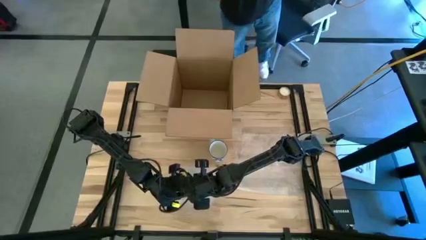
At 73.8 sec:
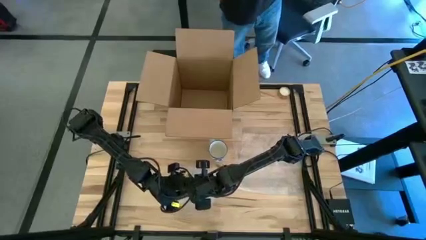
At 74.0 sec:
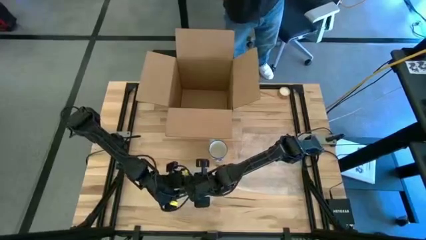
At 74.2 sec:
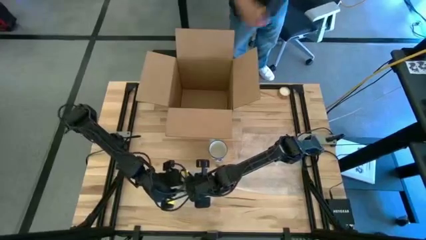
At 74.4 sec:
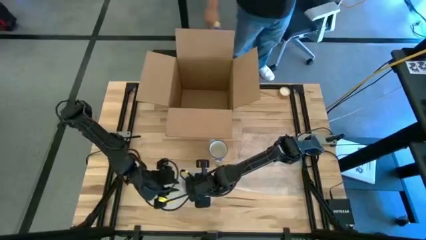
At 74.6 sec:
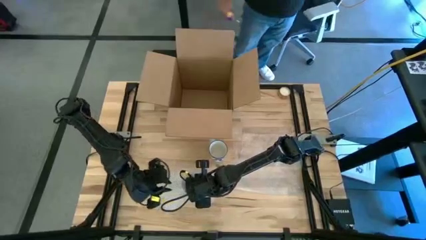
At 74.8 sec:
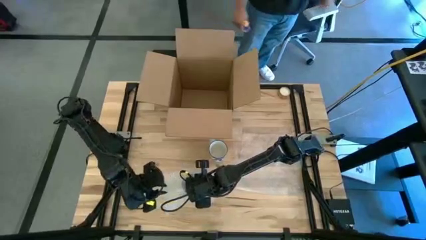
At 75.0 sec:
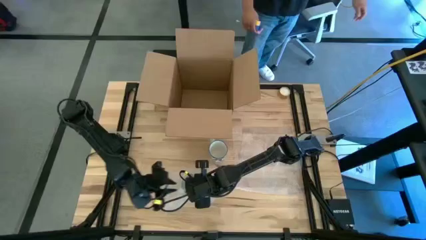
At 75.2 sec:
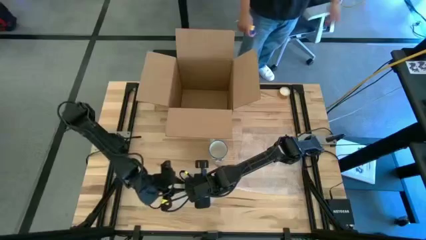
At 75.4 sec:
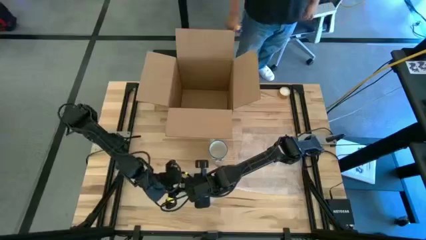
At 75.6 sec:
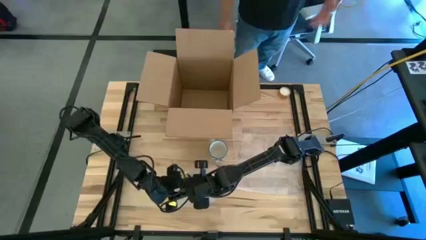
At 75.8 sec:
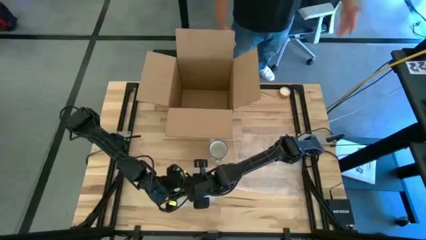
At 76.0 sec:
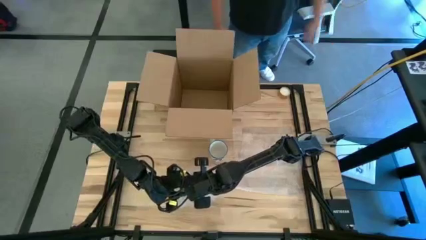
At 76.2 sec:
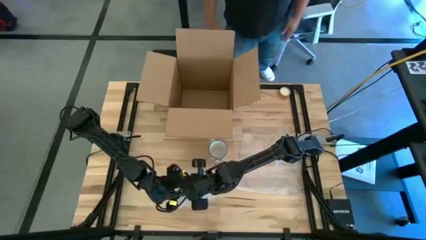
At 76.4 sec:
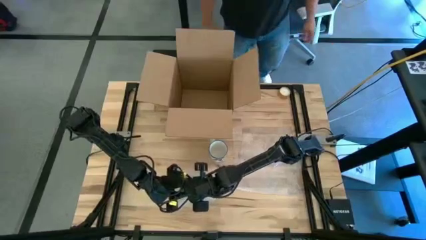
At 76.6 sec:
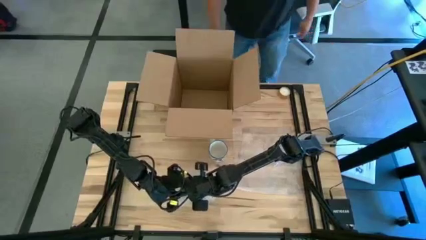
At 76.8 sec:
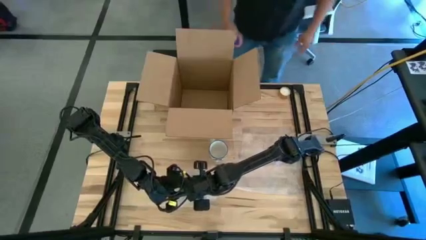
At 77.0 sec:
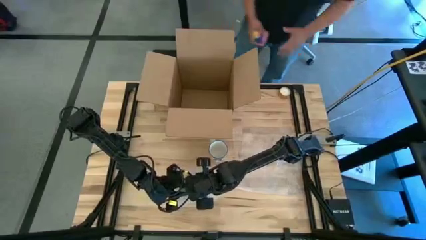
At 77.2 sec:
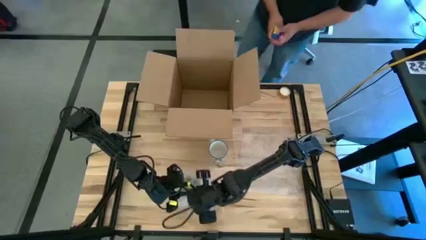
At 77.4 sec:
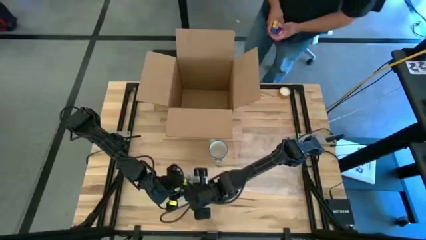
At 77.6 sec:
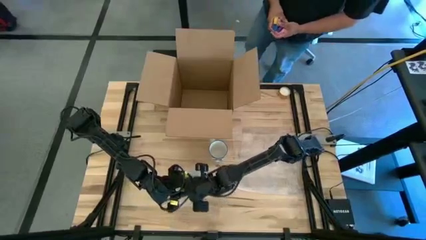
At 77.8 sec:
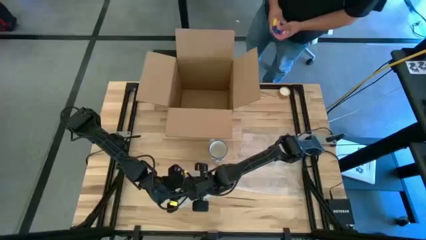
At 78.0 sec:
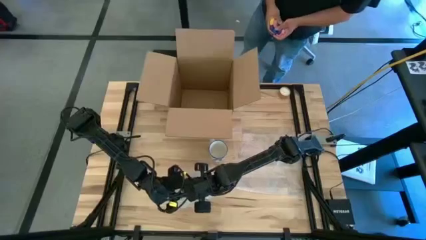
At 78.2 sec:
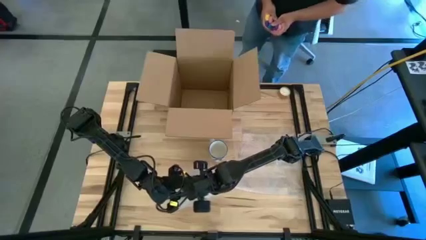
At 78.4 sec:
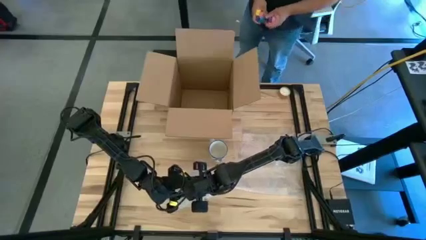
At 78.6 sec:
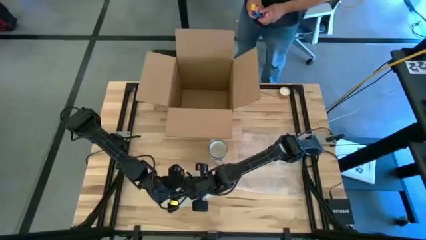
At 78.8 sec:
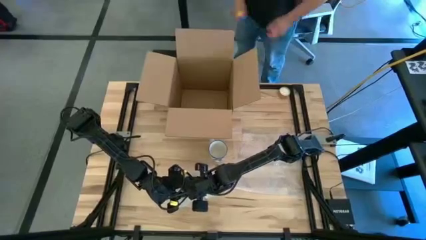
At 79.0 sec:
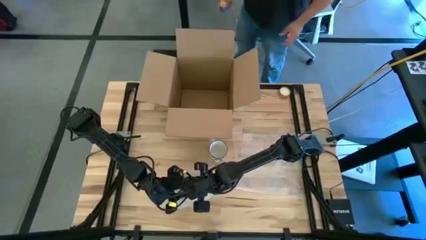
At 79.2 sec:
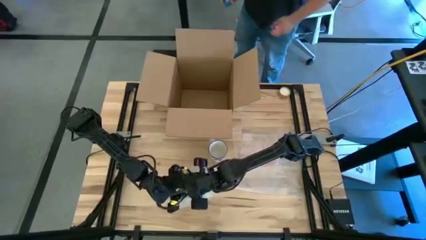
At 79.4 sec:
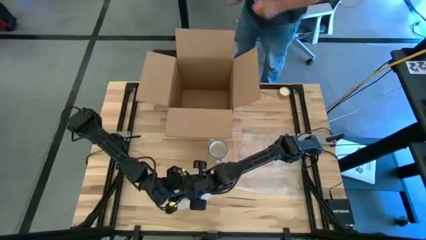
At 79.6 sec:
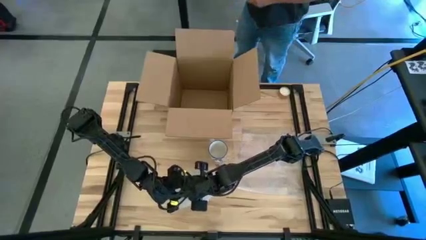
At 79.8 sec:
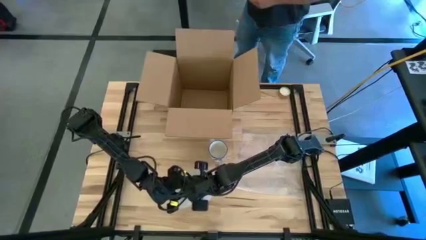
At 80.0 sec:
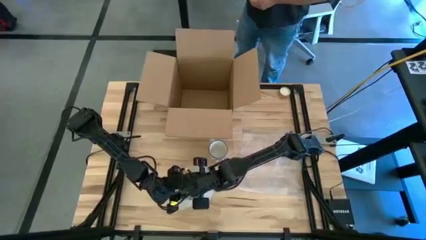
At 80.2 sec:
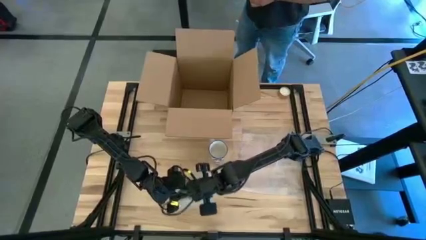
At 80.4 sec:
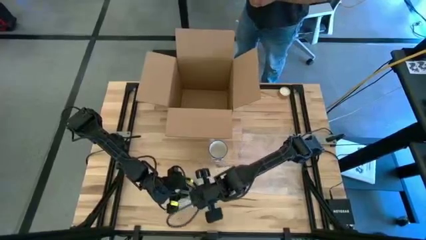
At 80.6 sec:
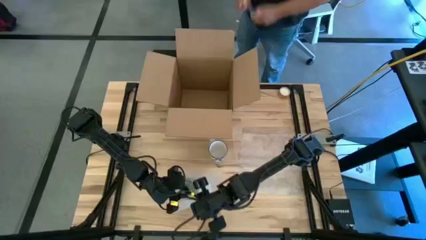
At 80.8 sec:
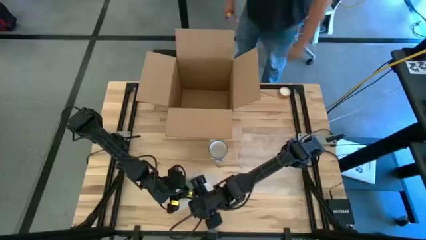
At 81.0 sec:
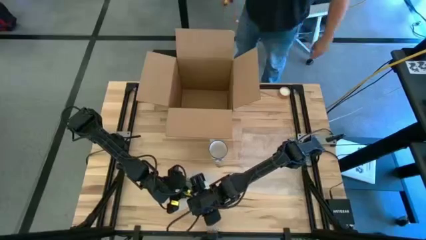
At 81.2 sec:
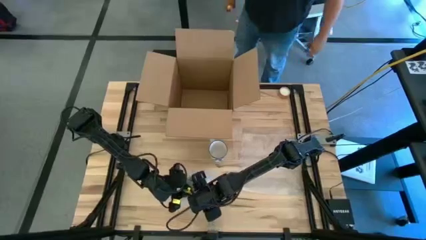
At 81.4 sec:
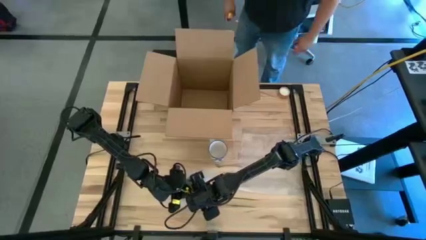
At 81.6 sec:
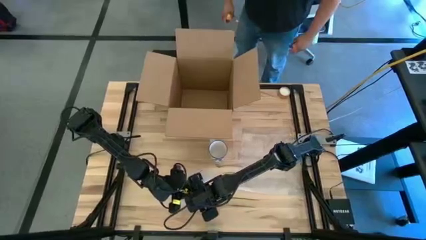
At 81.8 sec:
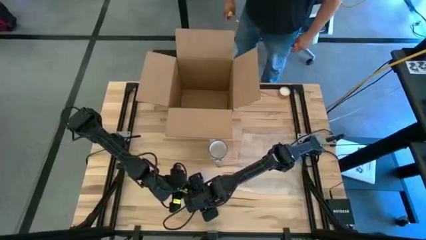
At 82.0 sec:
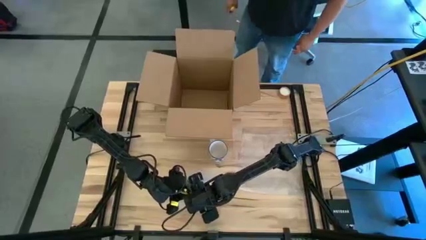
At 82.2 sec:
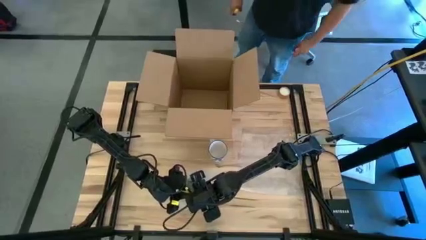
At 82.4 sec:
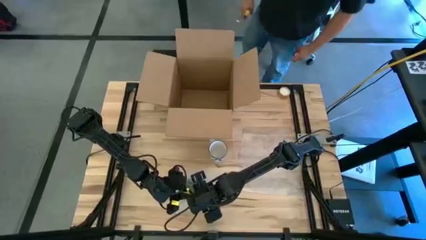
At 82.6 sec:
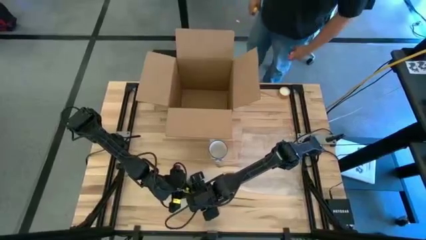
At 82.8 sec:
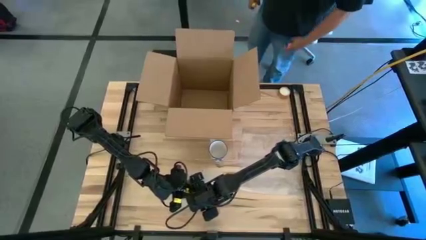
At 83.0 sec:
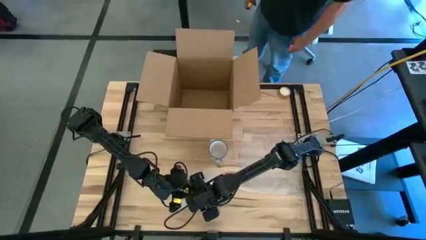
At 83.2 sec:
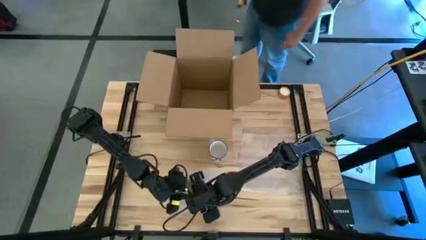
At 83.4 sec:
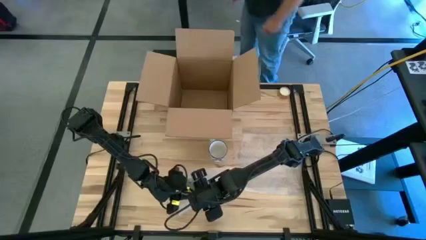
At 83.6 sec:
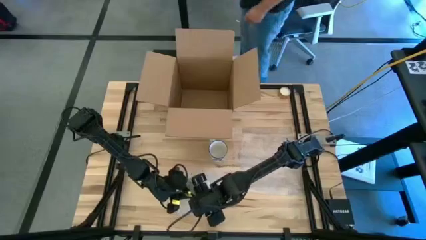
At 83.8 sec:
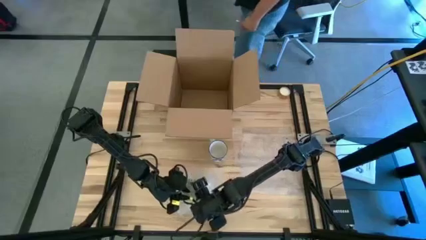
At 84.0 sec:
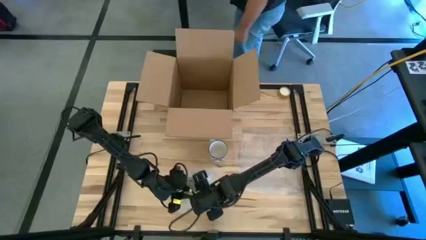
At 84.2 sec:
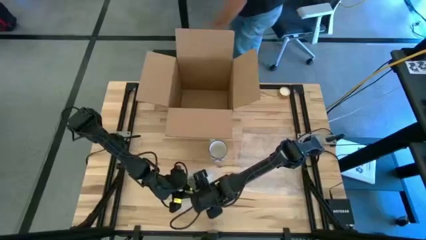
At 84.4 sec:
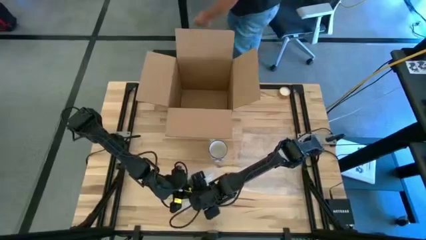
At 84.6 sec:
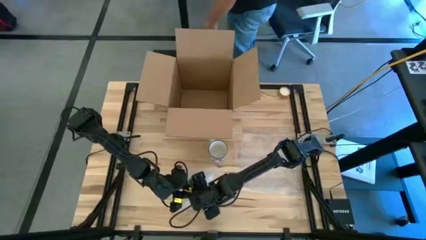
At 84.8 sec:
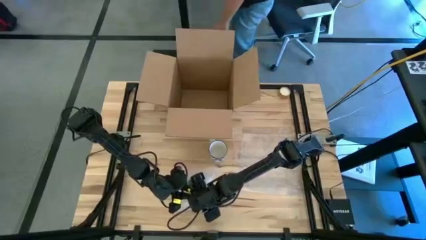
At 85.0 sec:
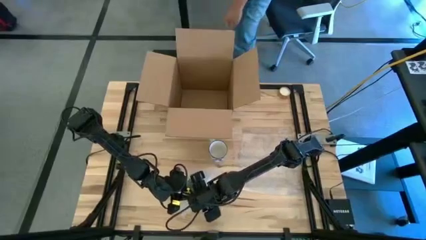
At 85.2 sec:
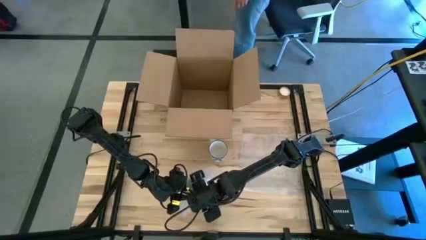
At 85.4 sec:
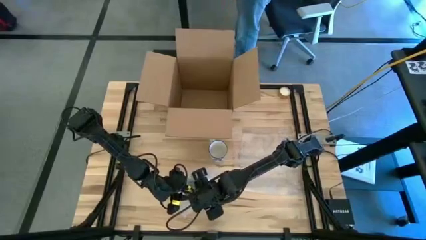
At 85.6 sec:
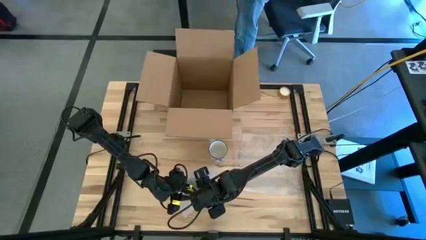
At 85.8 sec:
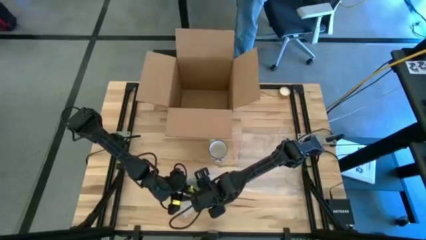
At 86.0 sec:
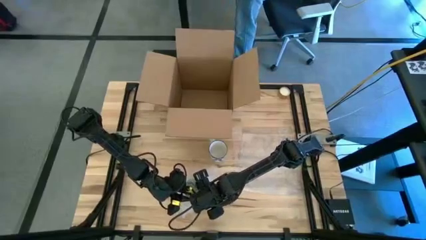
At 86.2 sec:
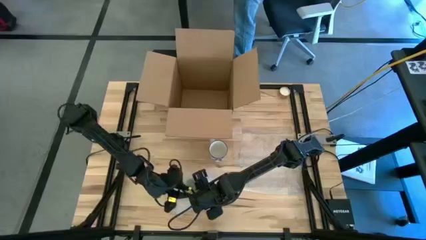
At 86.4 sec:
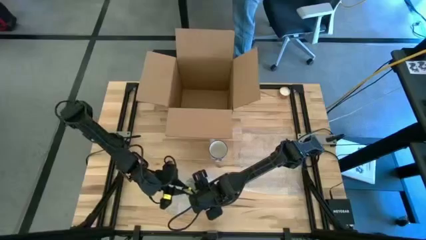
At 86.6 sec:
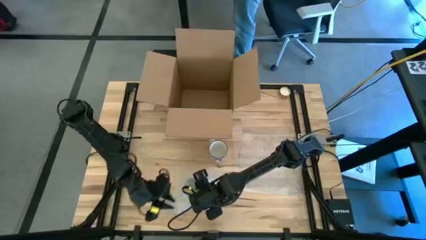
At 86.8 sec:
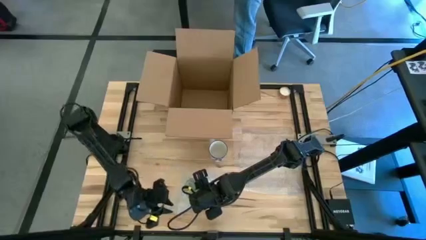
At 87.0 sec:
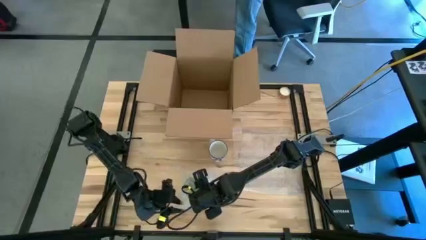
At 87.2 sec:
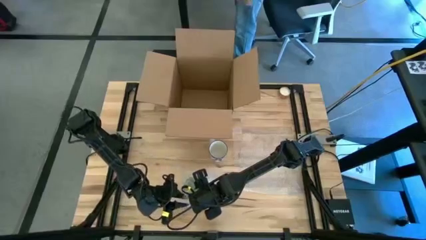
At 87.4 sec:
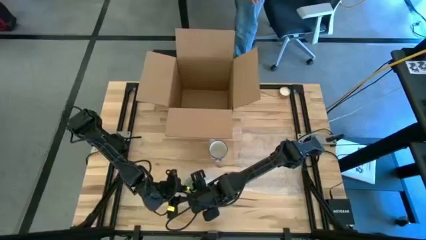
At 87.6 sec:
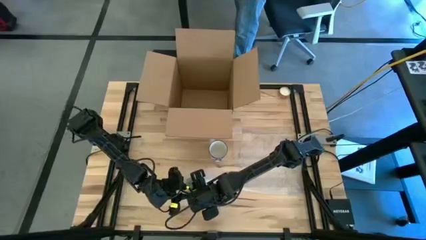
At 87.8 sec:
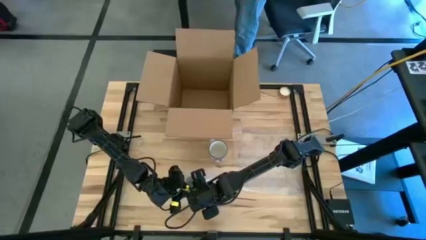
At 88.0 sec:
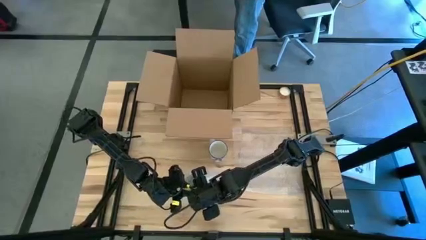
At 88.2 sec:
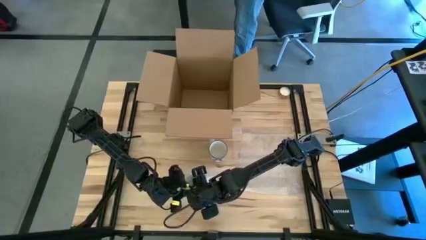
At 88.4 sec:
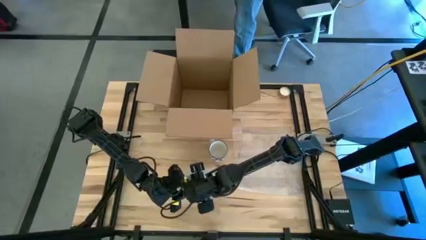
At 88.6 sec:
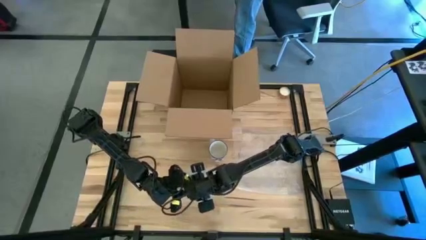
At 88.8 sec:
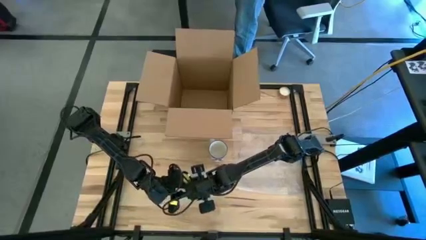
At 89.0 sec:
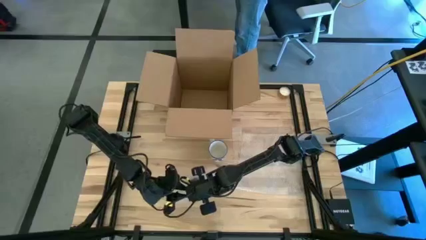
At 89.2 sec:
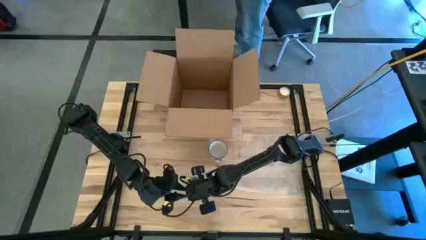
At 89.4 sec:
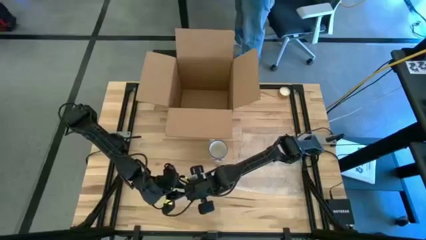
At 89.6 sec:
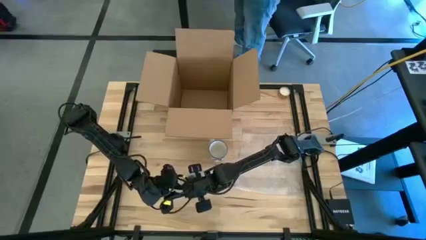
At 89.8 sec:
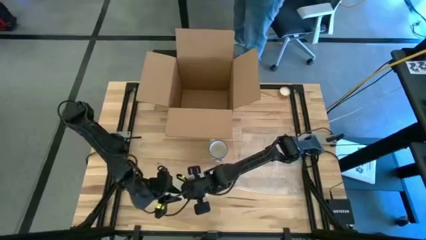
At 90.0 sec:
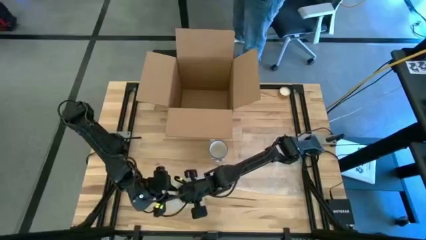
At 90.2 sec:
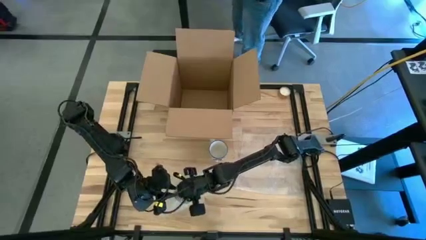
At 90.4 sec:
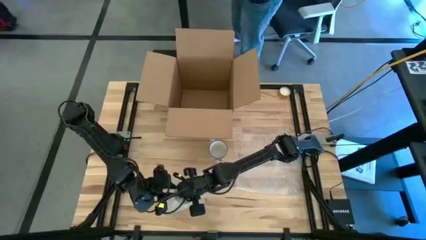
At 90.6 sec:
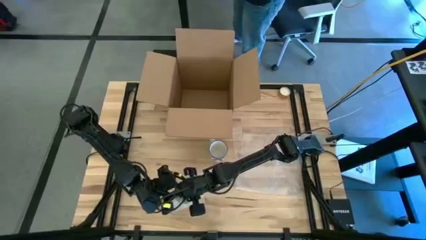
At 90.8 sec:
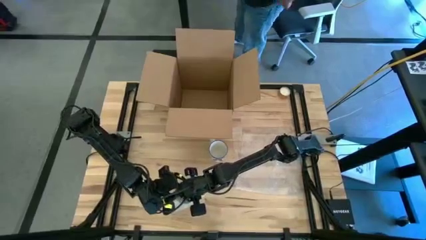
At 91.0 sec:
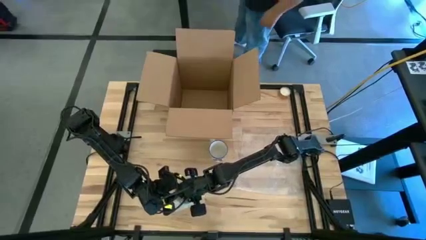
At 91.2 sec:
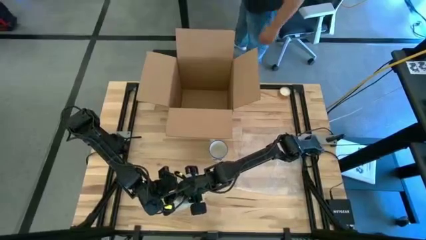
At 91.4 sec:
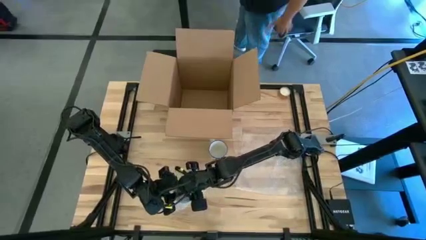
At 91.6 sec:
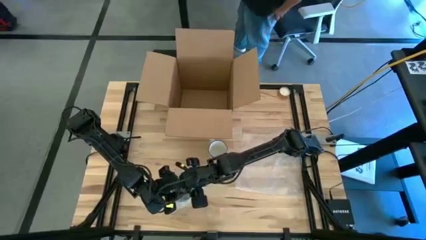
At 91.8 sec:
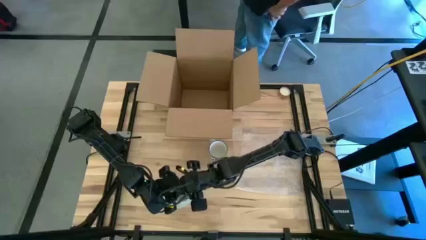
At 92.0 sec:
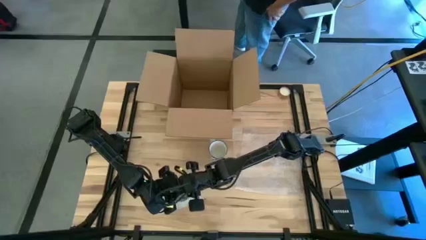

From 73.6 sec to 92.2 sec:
Task: wrap mug
Wrap the green mug with the left side transparent bubble wrap
